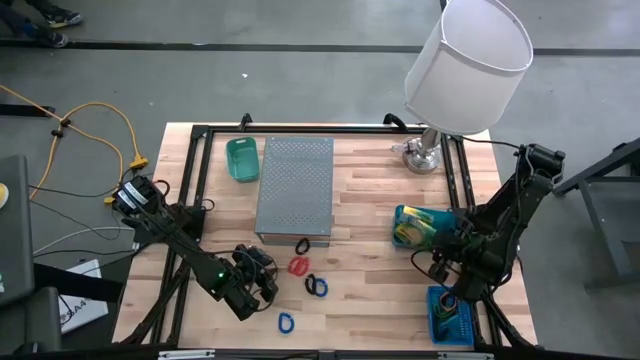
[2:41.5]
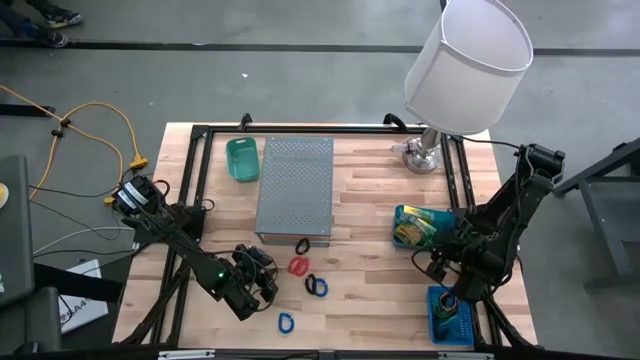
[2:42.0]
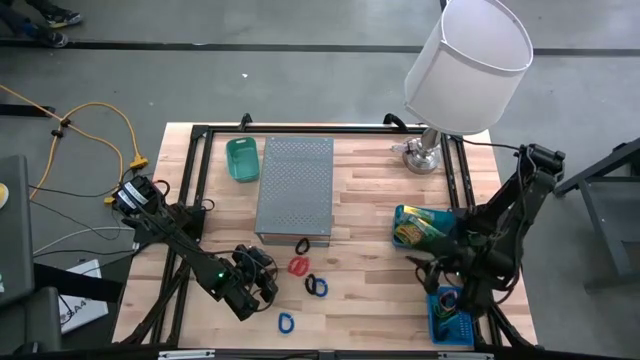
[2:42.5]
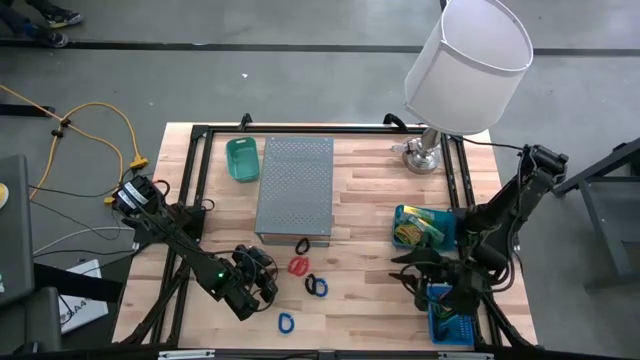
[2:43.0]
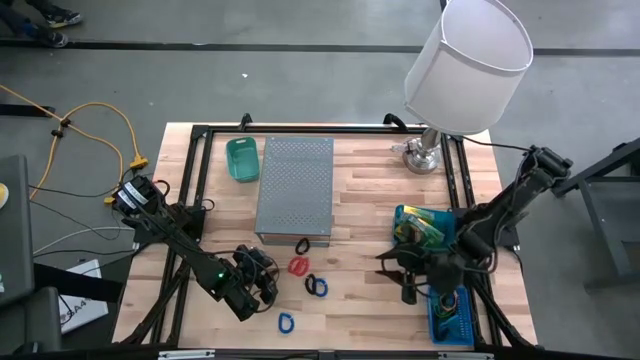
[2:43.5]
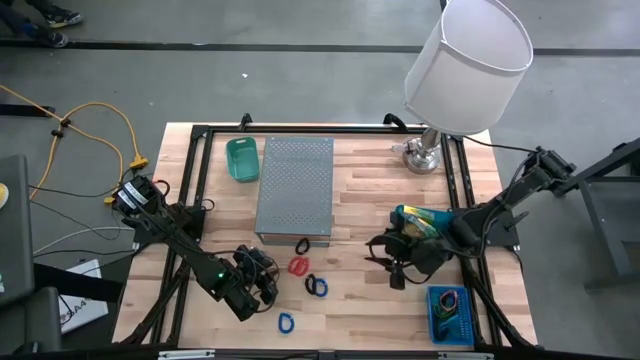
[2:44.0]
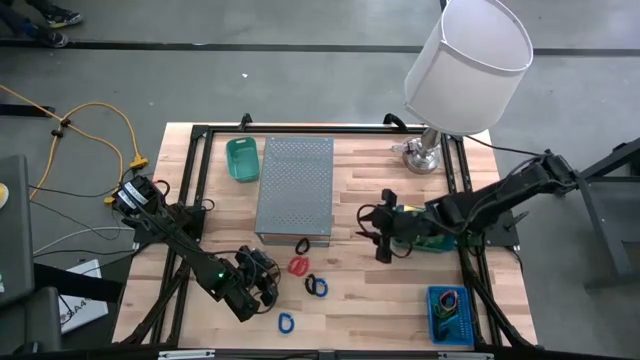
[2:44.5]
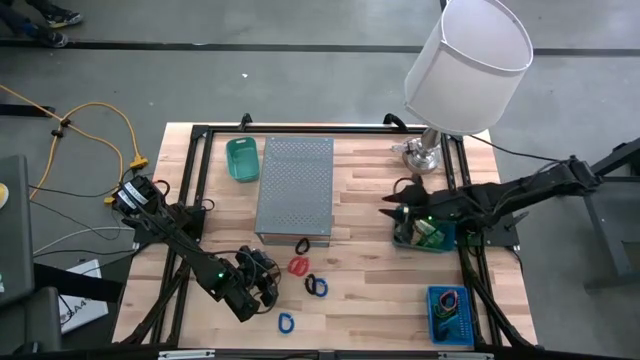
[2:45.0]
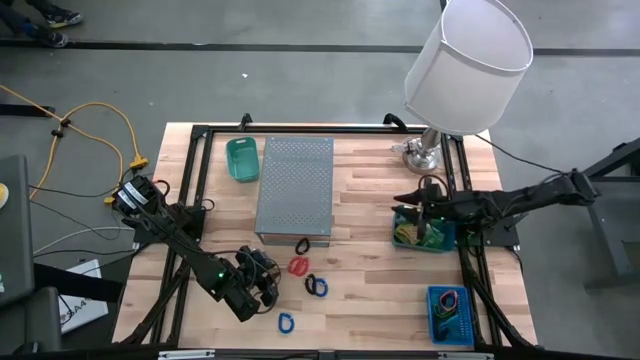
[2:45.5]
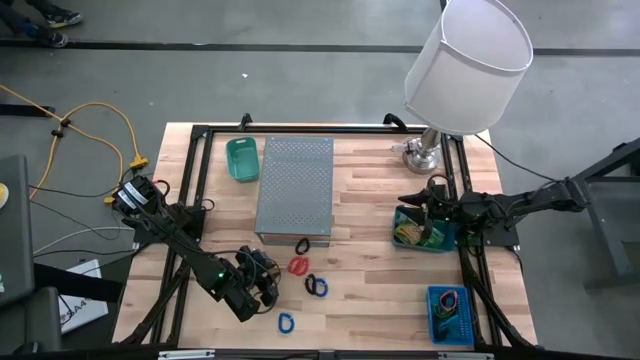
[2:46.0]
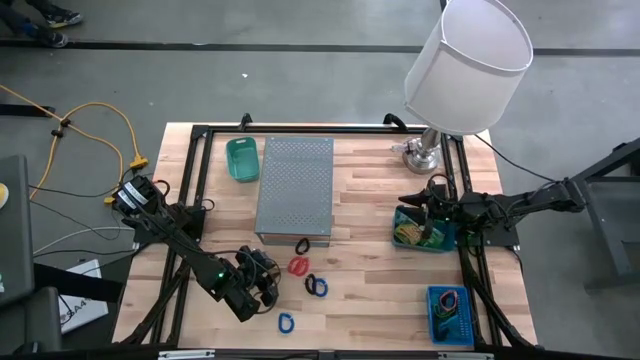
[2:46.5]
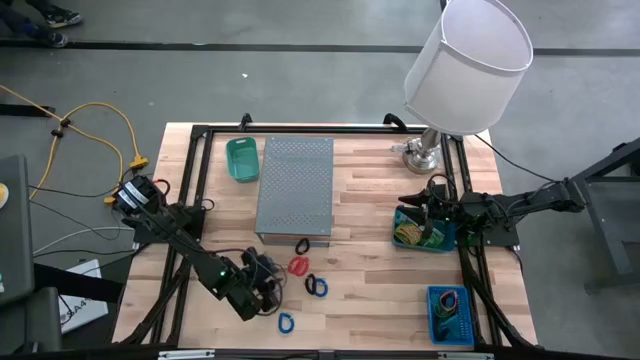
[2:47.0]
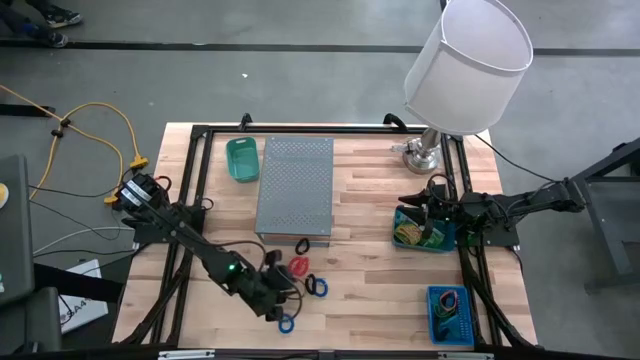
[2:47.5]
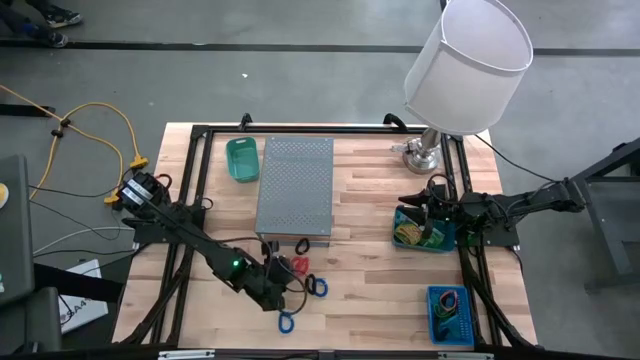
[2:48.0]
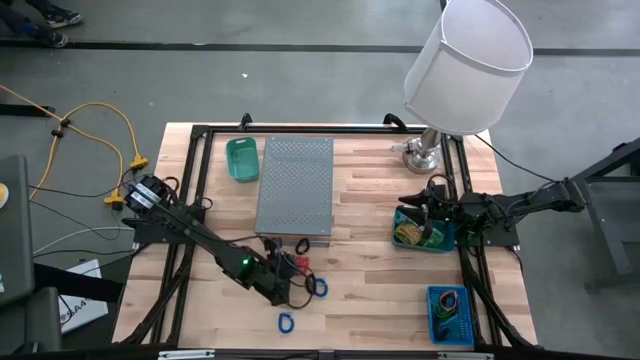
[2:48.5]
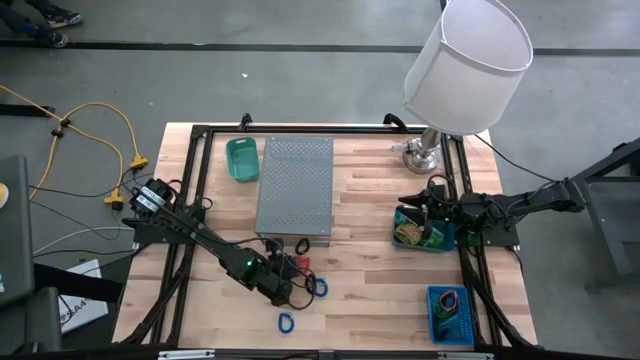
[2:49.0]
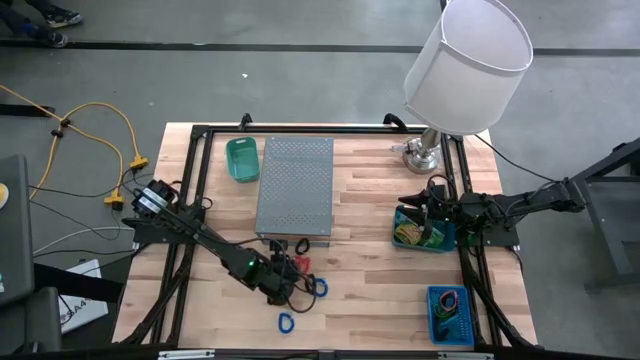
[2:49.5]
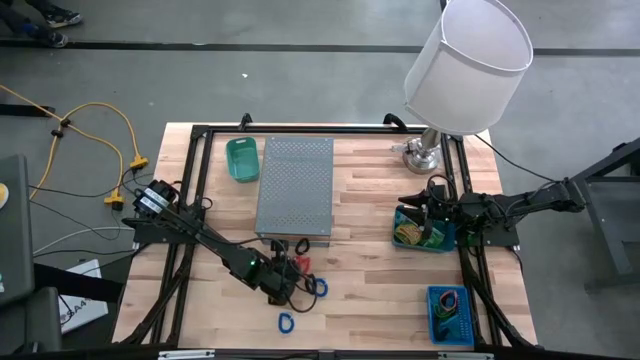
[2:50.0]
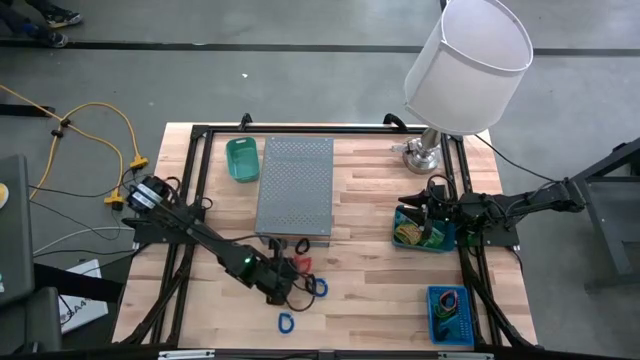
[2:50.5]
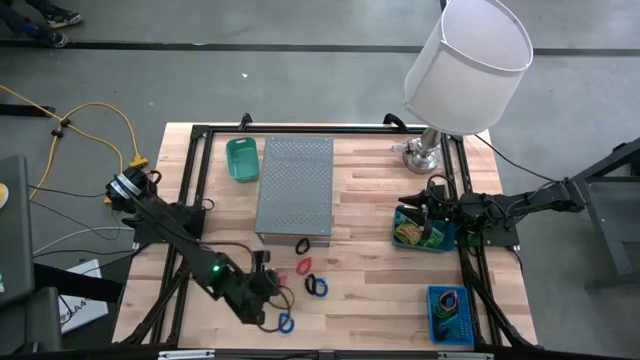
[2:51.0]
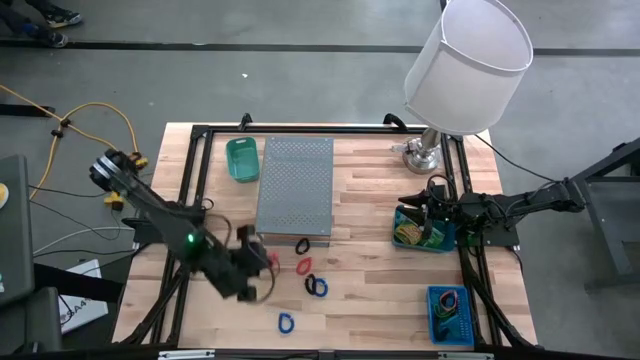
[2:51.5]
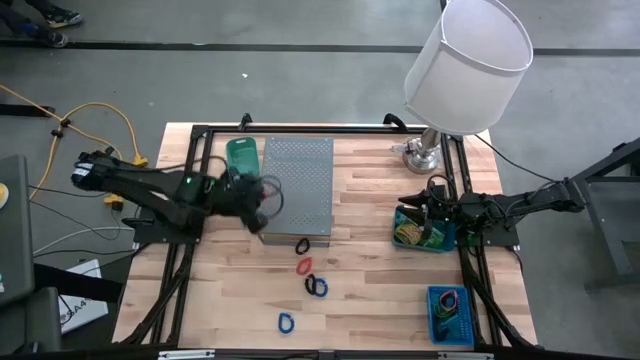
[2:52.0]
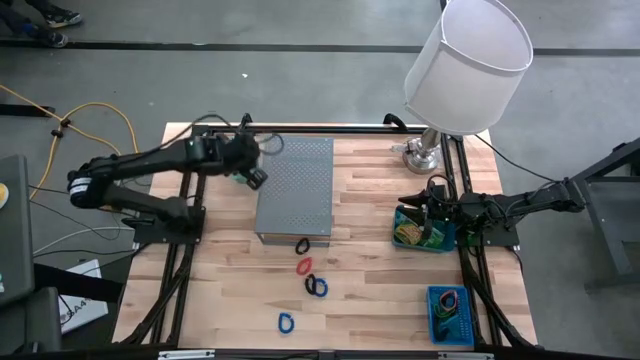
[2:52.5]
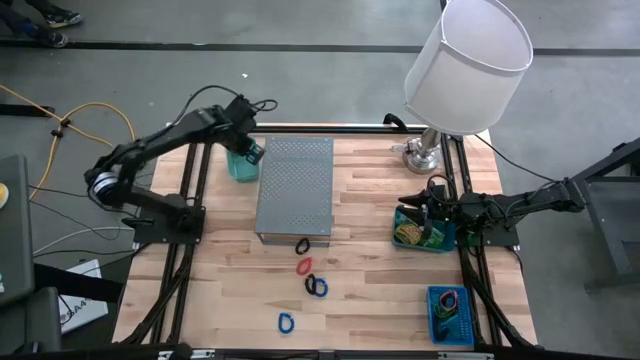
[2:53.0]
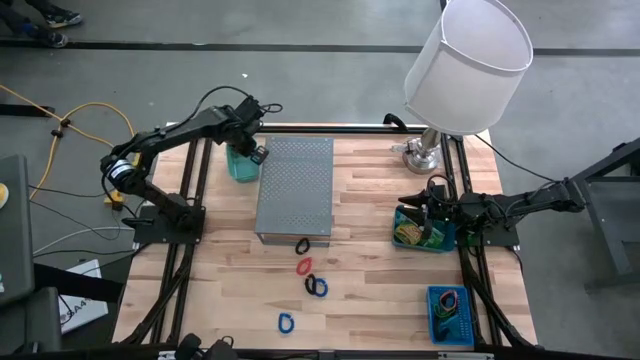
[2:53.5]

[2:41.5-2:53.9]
Task: Pick & Place Office Desk Supplies
Put the left orange spring keychain into the dark green bin

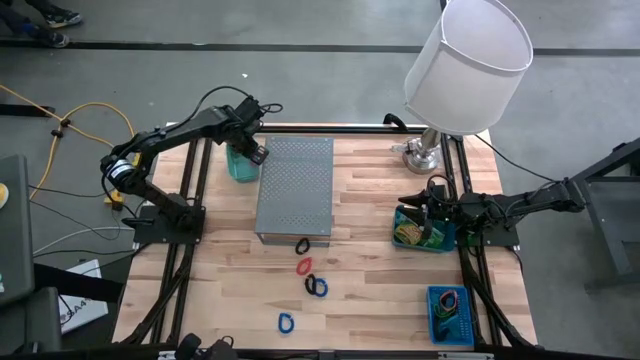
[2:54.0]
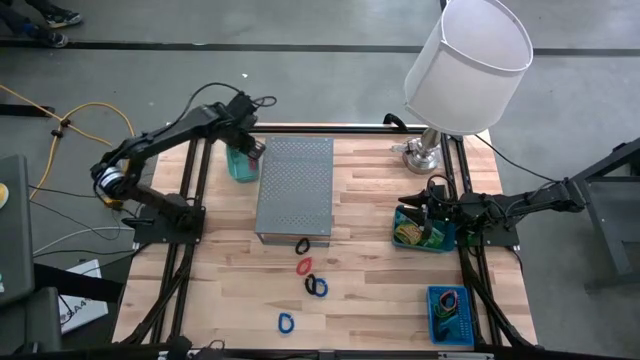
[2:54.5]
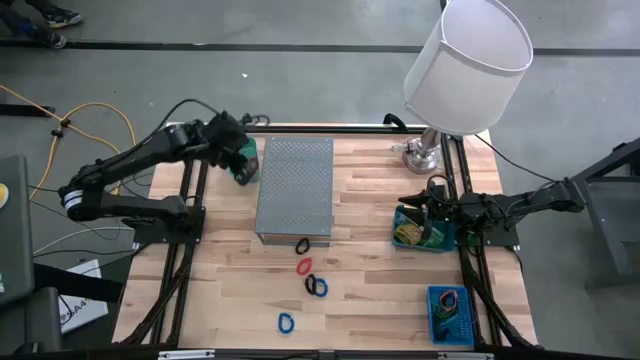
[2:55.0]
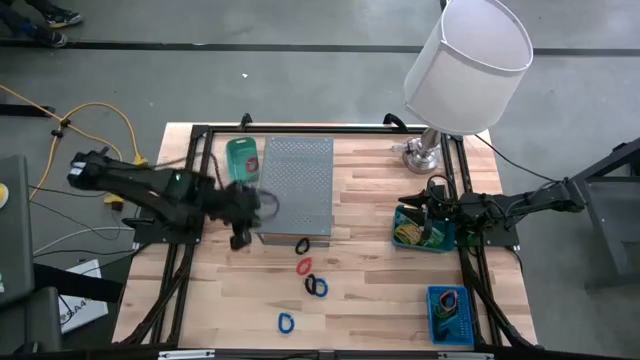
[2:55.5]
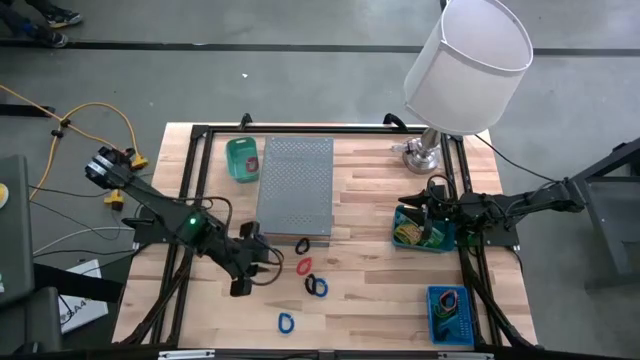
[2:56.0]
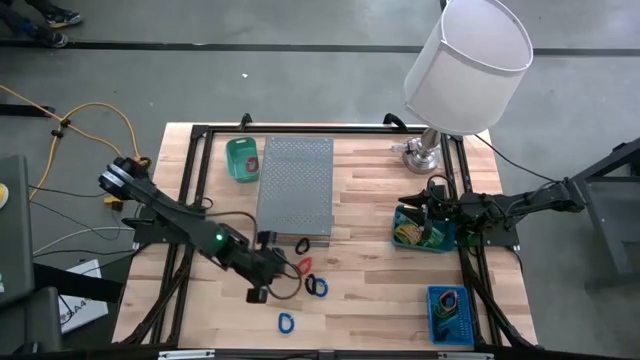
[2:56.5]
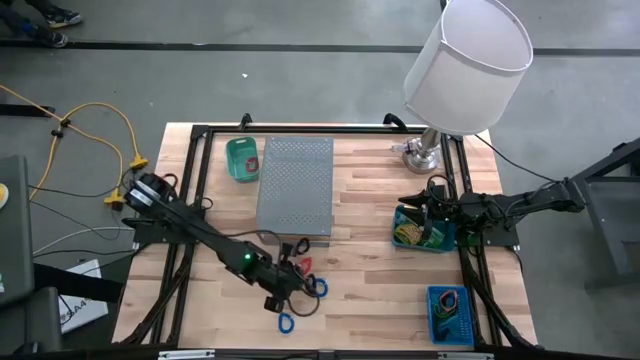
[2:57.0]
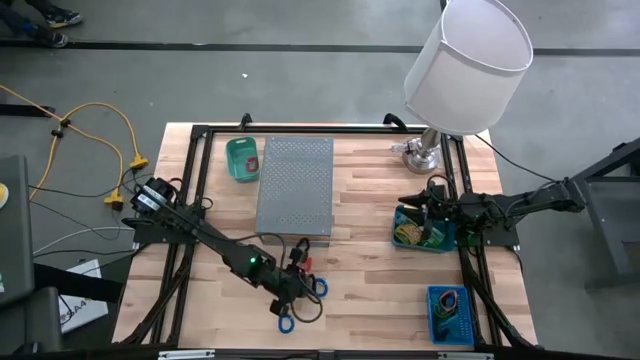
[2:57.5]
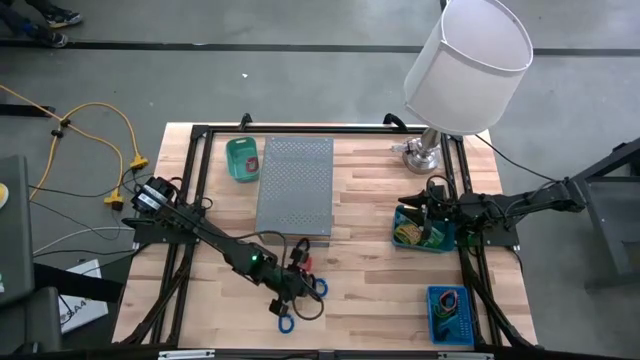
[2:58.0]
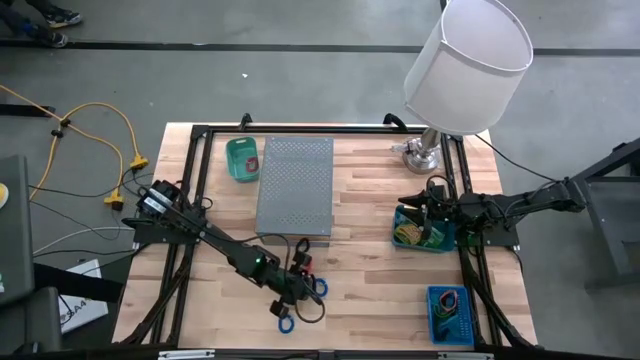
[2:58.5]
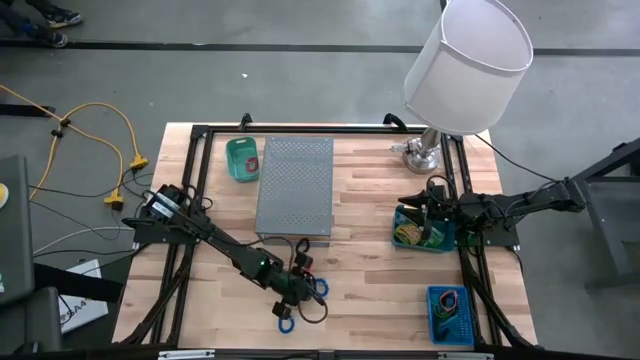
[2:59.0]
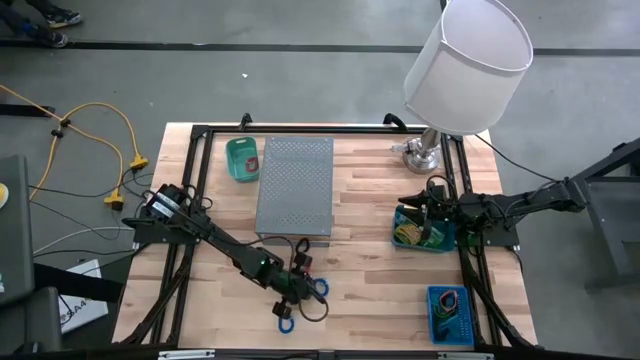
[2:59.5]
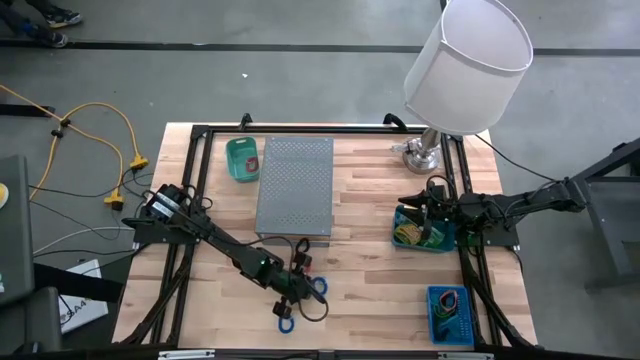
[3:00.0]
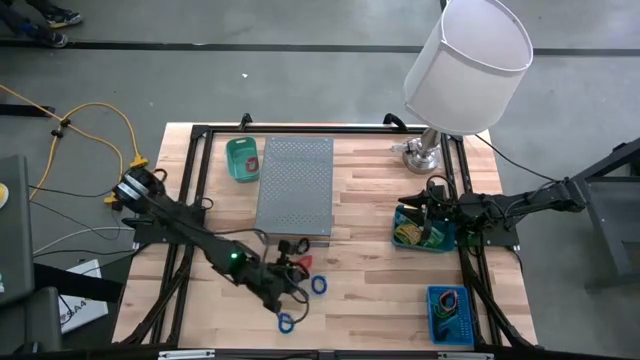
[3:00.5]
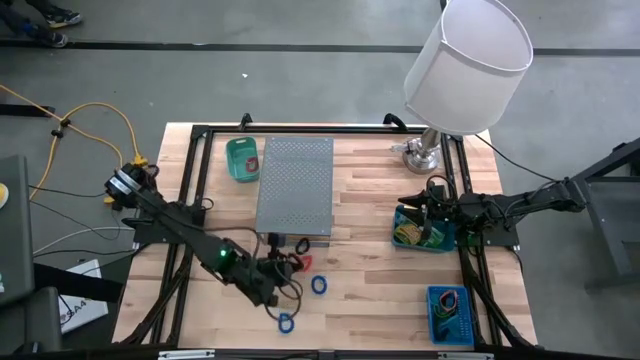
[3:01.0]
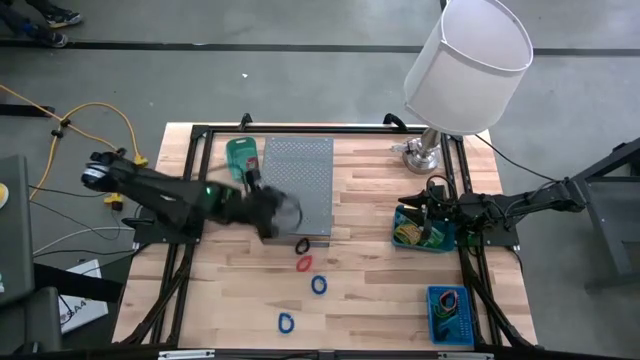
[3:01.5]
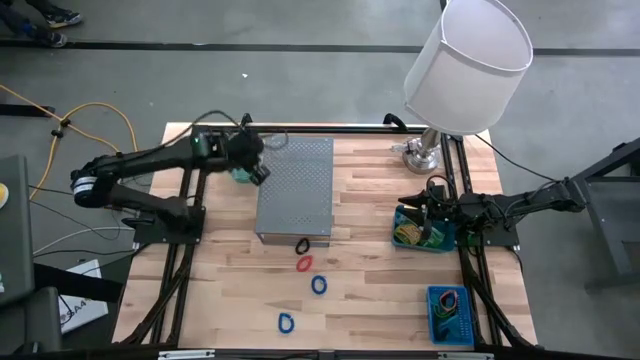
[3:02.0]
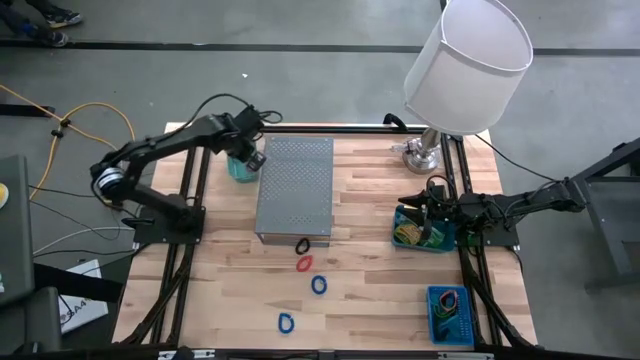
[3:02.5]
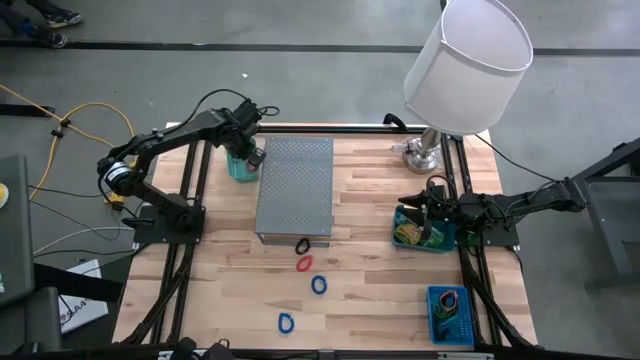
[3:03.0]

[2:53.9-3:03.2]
Put the bottom black spring keychain into the dark green bin

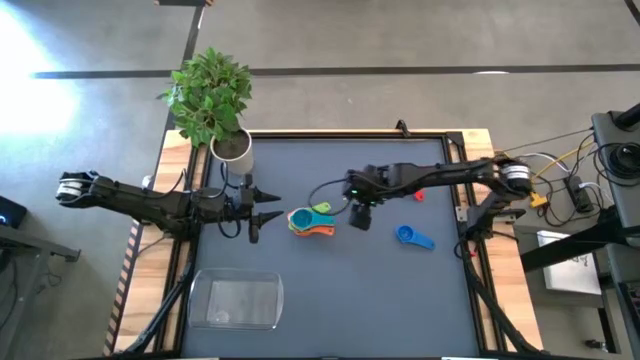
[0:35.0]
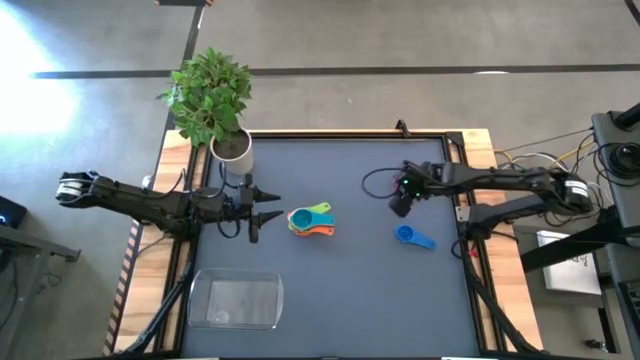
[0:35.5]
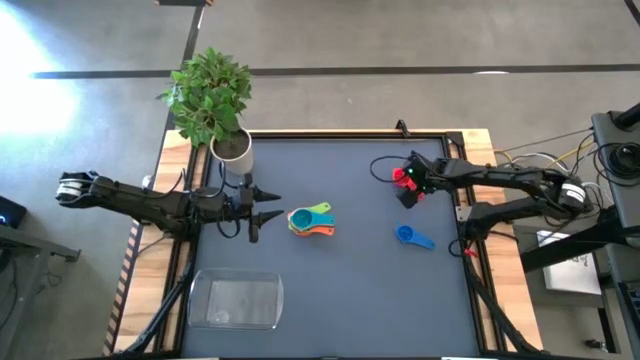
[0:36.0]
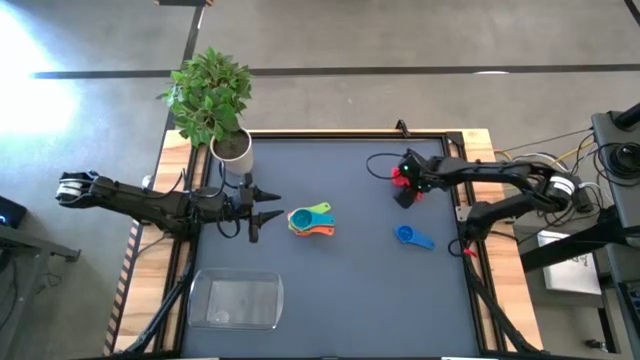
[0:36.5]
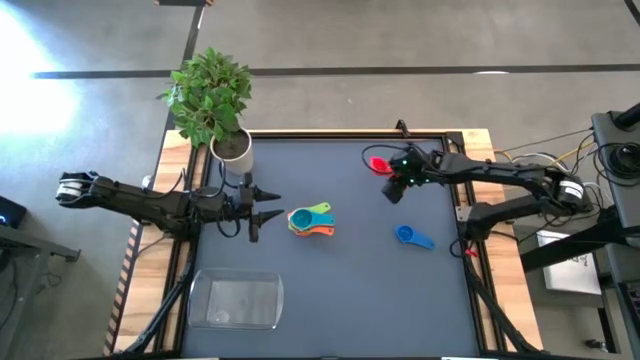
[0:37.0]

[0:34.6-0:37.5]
Task: Nest measuring cups in basket
Stack the red measuring cup on top of the light blue measuring cup
